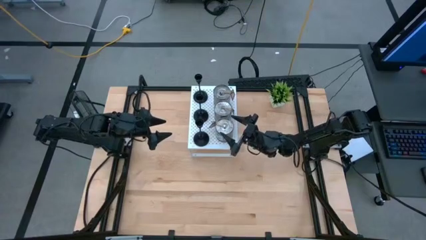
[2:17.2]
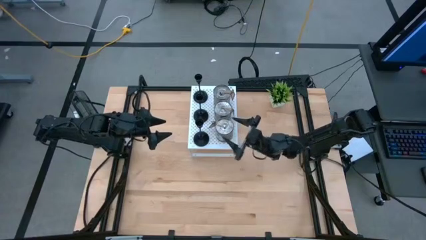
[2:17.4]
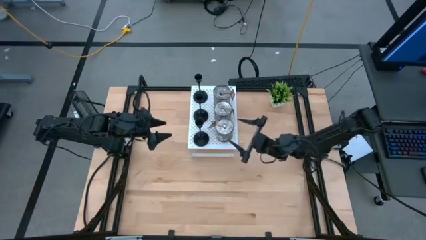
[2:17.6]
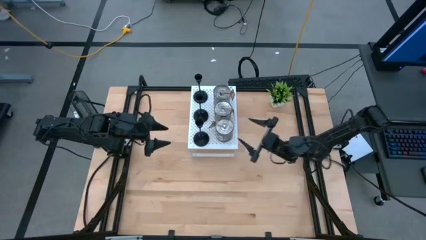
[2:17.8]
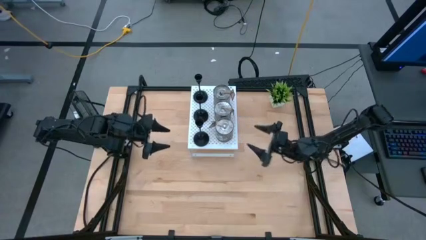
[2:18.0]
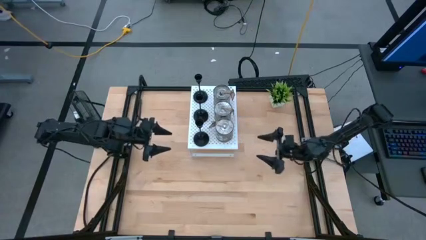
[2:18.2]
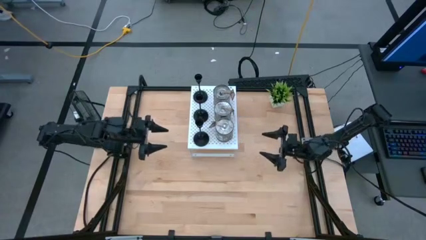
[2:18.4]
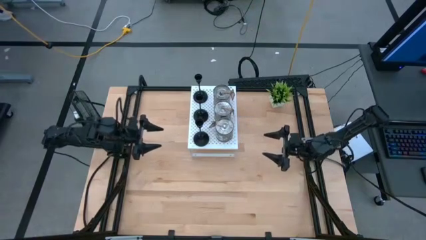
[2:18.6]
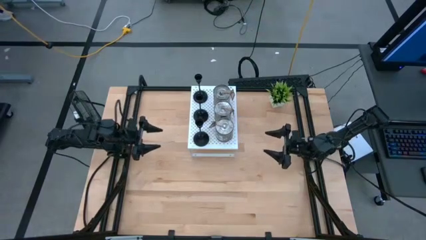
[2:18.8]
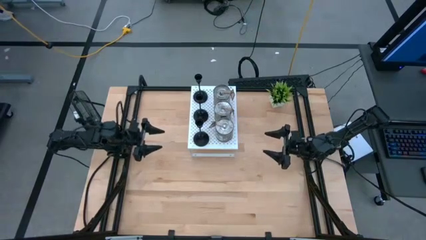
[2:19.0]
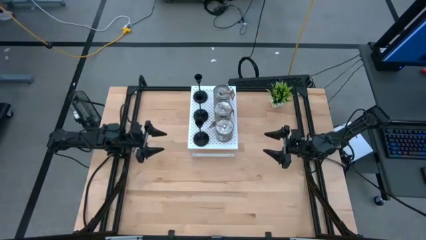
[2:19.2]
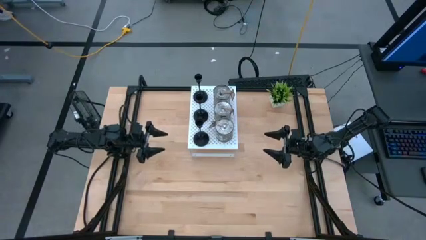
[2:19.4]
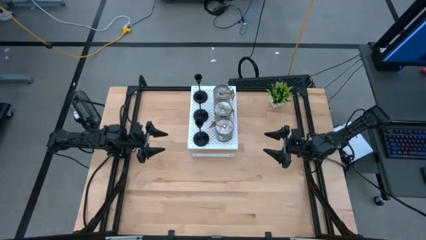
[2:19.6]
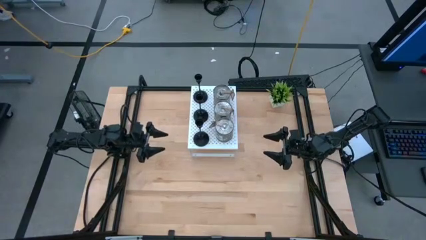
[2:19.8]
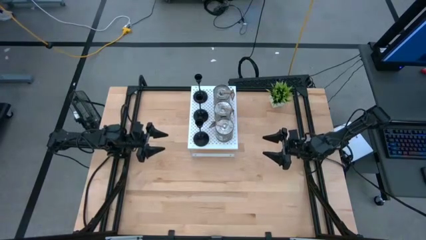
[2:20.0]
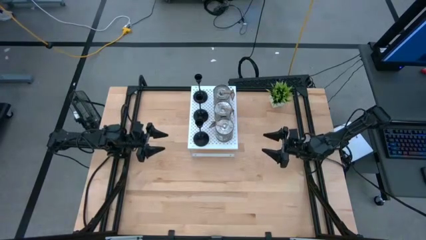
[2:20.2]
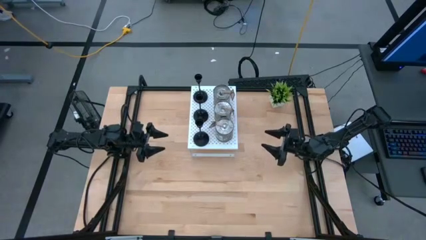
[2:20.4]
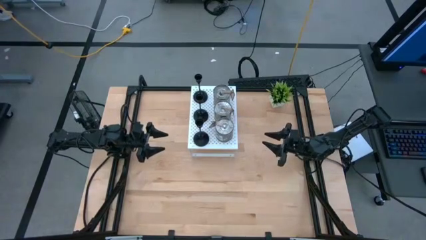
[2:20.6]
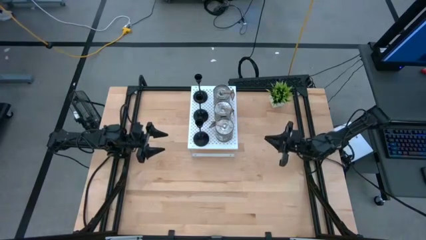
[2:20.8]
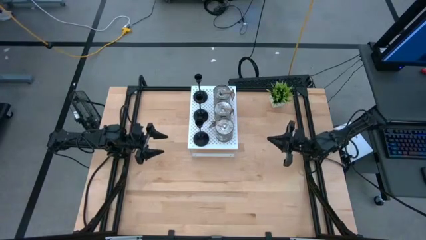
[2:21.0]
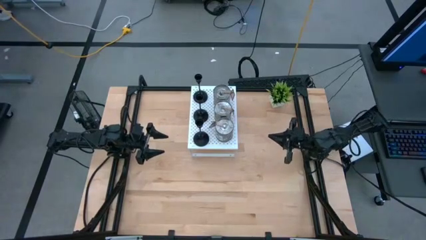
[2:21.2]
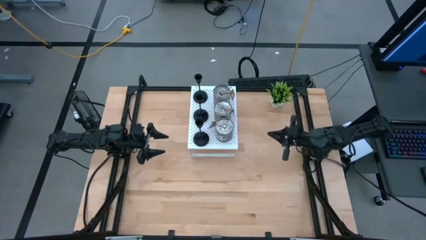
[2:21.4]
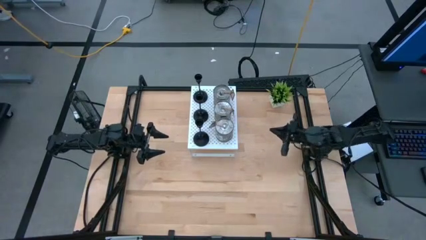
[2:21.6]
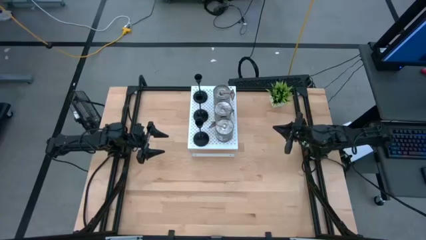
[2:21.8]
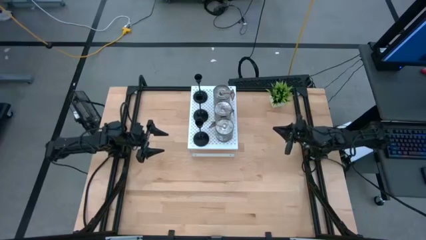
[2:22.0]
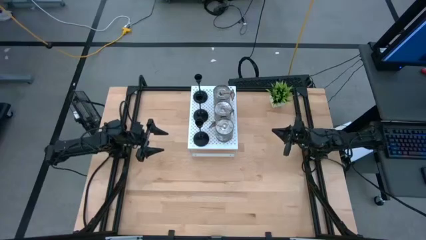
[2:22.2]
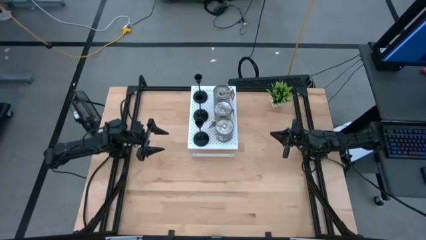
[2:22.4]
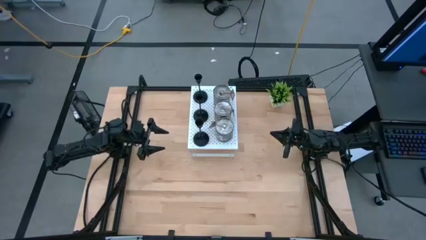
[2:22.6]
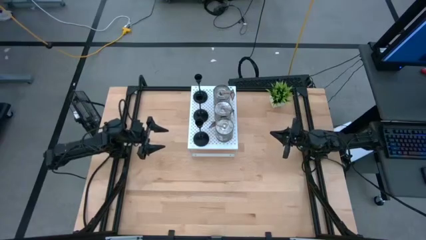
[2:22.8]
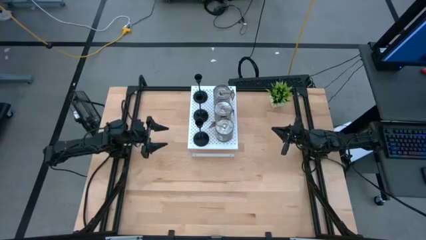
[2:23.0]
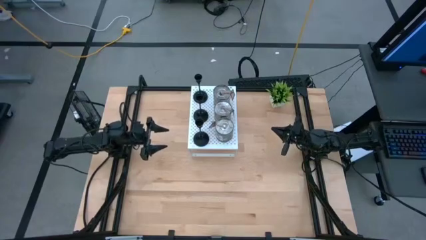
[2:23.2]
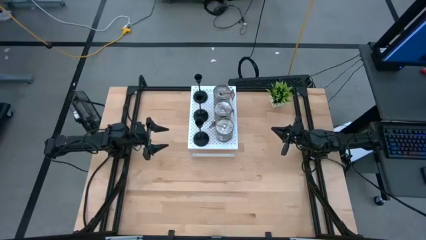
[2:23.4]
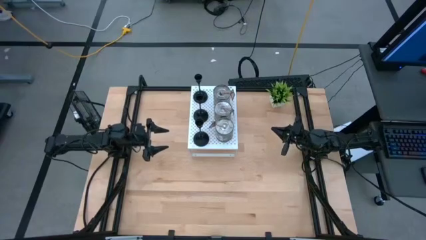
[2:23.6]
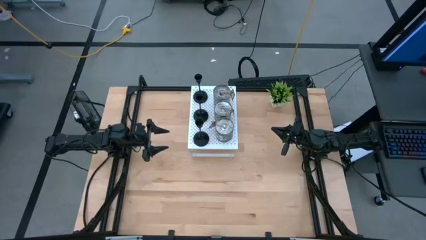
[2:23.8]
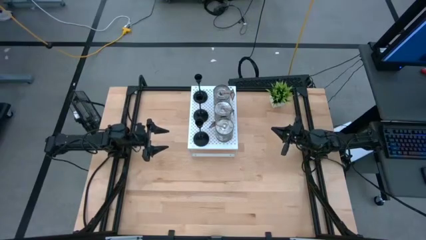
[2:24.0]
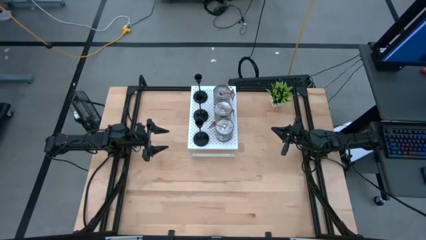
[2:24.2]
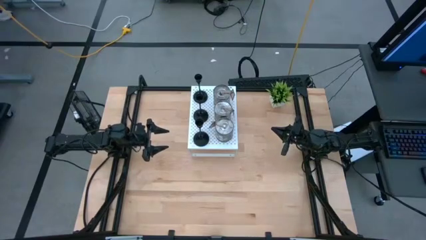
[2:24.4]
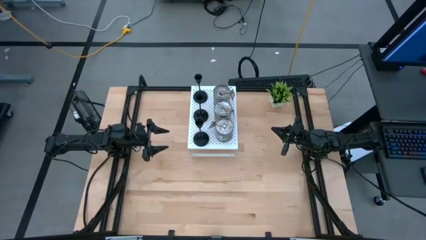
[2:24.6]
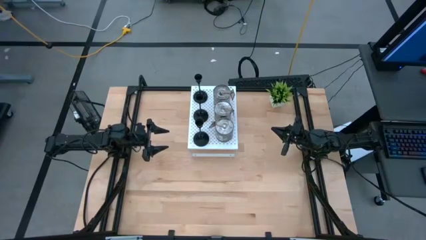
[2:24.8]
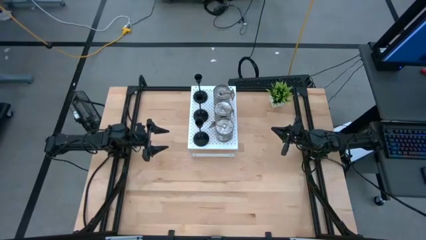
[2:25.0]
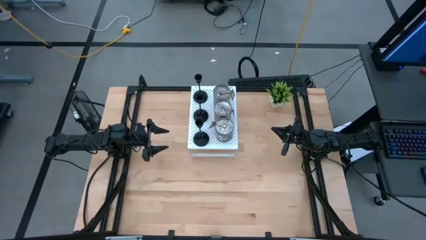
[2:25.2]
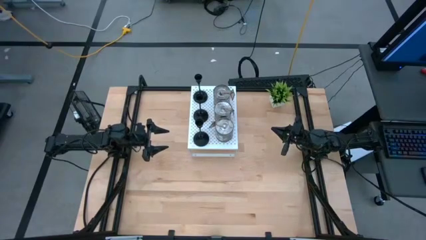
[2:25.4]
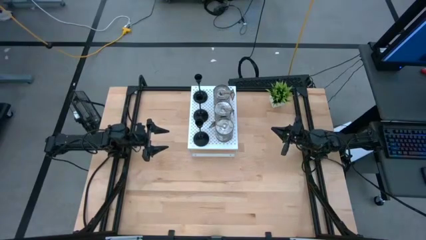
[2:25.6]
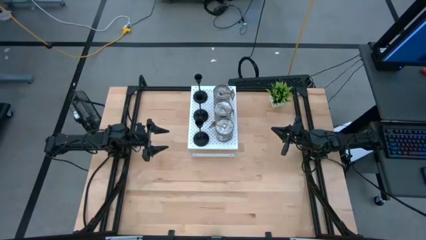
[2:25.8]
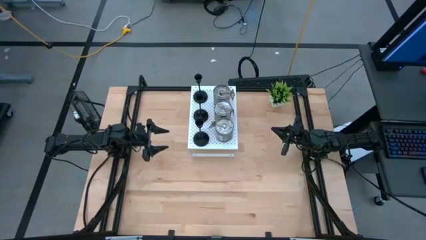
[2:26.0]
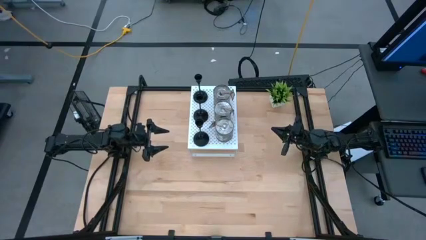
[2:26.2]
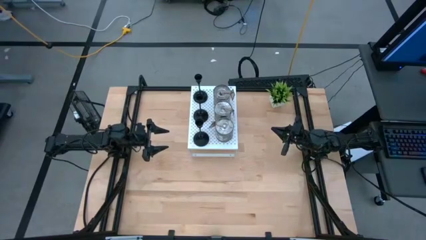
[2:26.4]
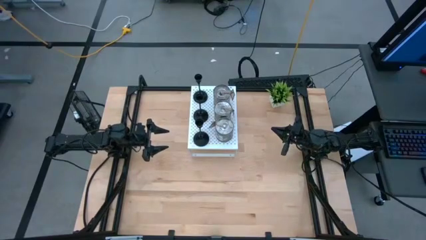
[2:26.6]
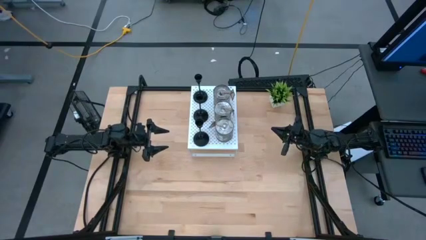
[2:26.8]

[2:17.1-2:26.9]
Task: Pick & Place candle stick holders
Return to Home Position

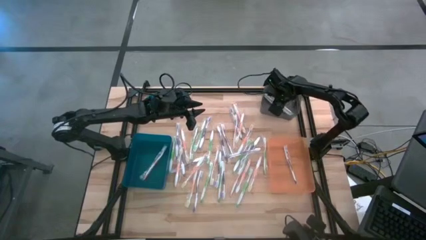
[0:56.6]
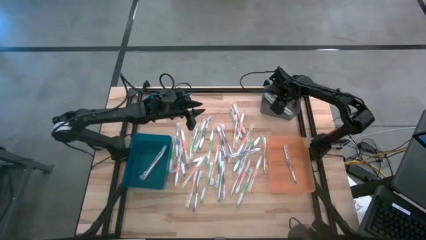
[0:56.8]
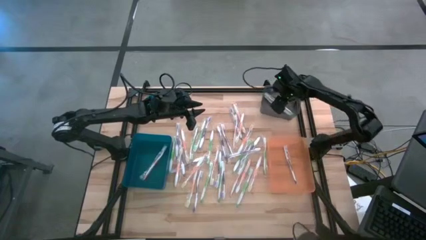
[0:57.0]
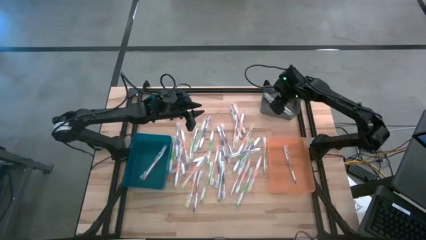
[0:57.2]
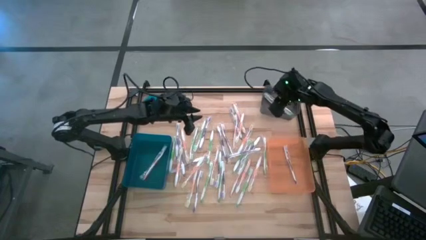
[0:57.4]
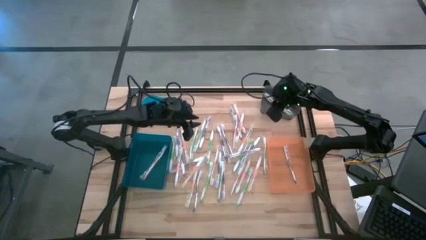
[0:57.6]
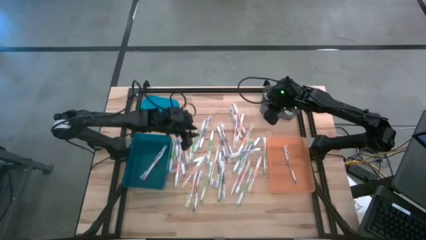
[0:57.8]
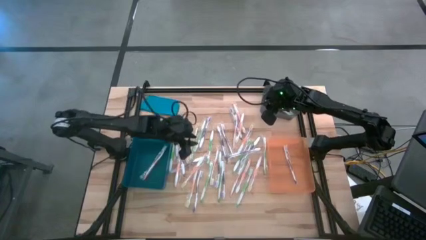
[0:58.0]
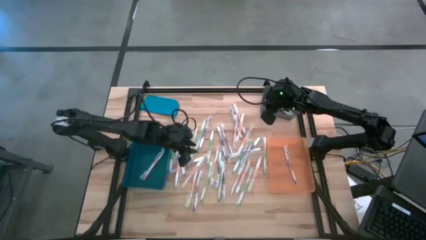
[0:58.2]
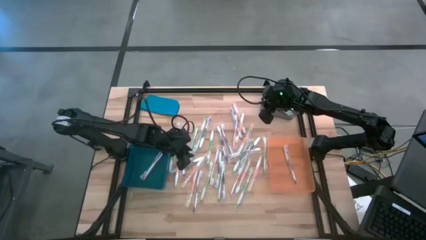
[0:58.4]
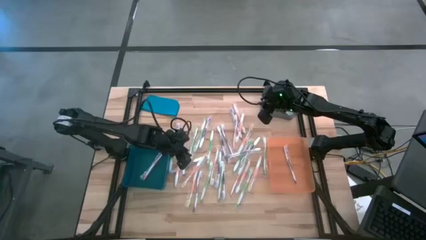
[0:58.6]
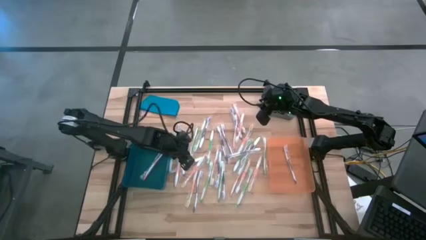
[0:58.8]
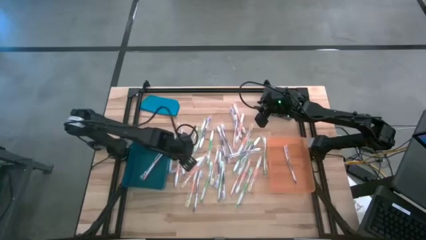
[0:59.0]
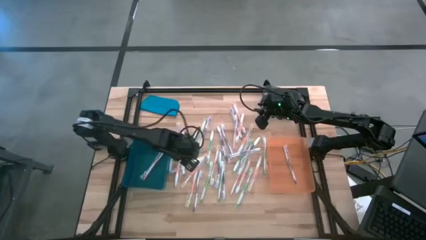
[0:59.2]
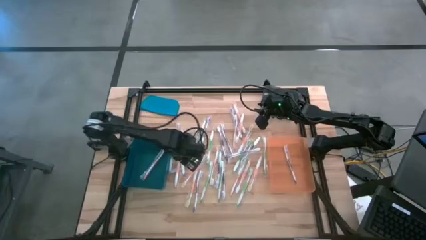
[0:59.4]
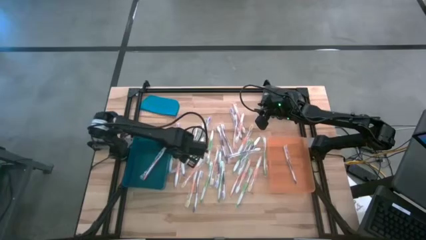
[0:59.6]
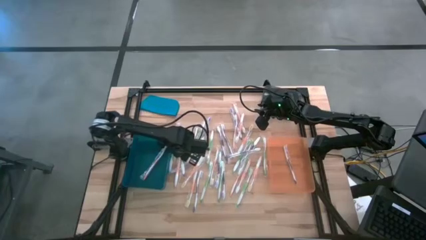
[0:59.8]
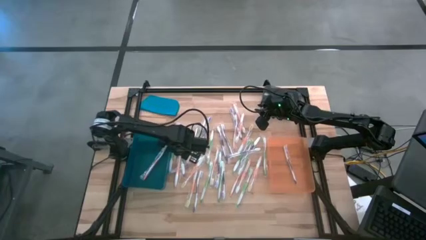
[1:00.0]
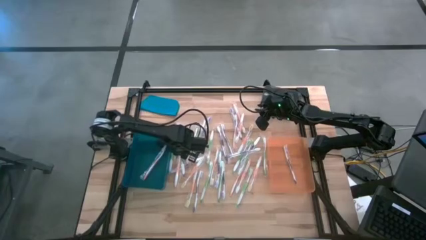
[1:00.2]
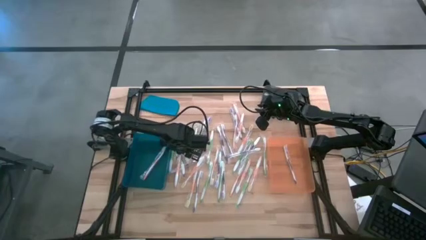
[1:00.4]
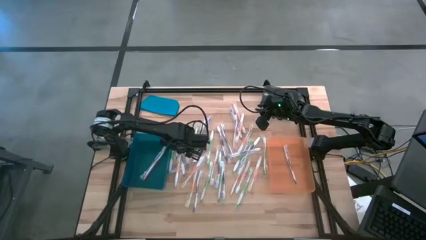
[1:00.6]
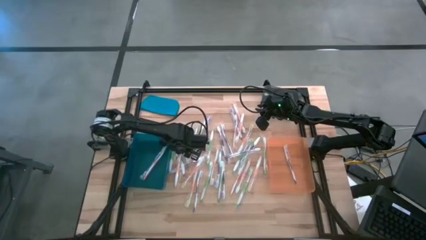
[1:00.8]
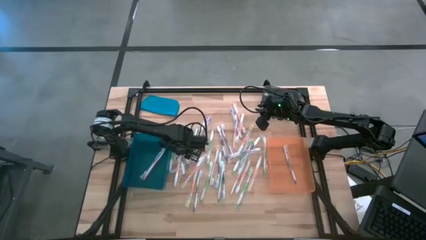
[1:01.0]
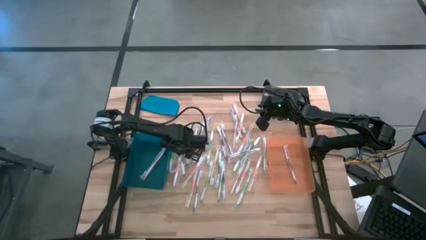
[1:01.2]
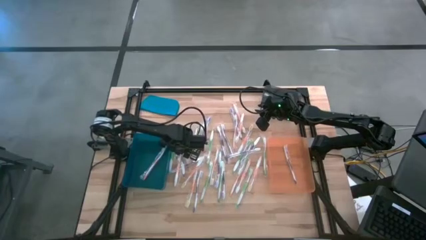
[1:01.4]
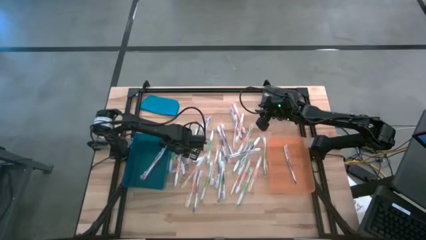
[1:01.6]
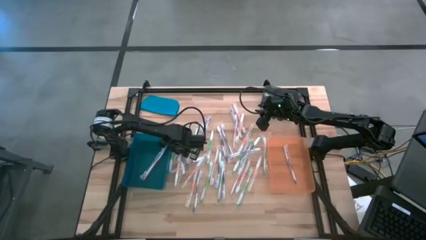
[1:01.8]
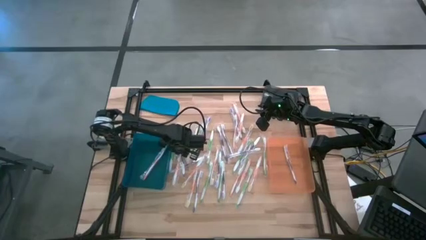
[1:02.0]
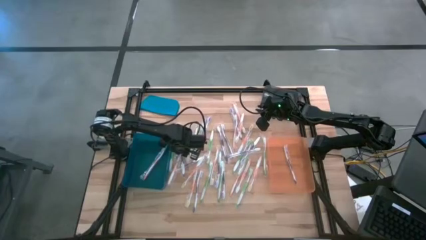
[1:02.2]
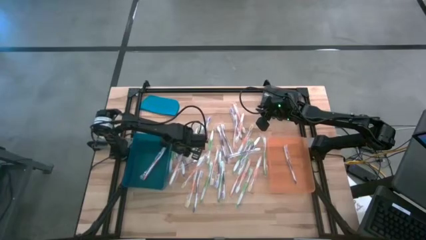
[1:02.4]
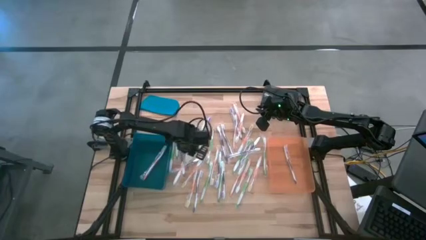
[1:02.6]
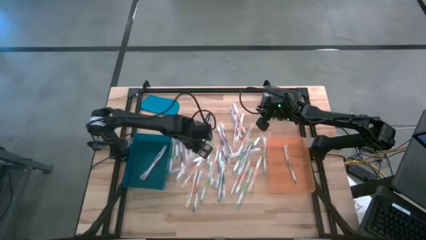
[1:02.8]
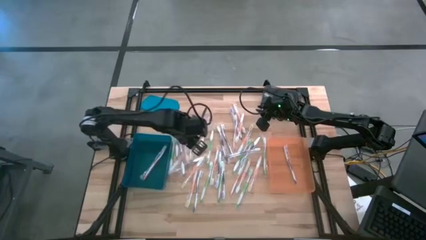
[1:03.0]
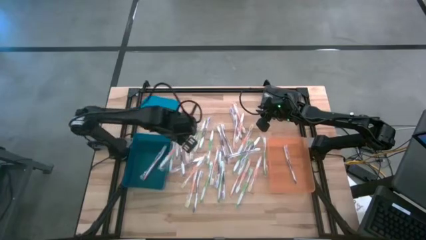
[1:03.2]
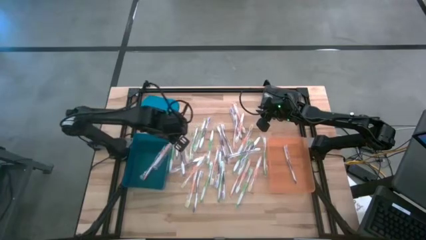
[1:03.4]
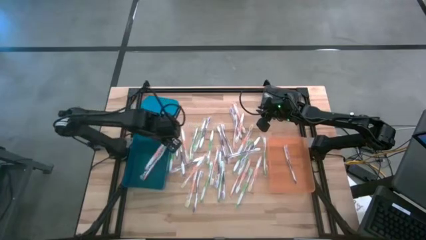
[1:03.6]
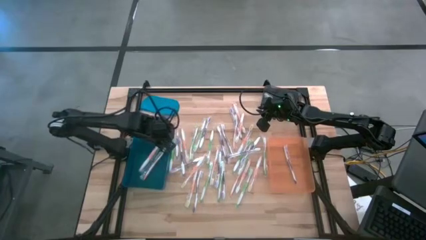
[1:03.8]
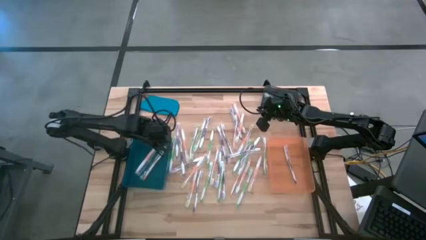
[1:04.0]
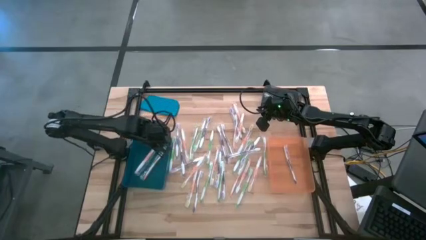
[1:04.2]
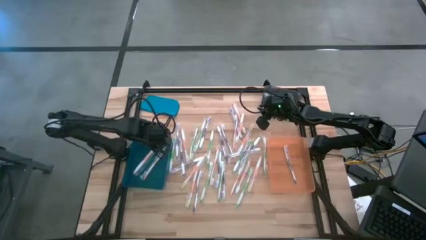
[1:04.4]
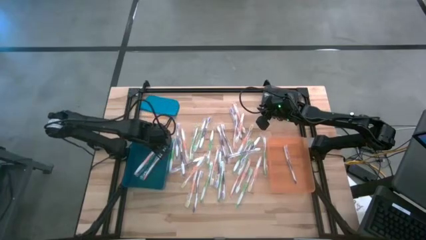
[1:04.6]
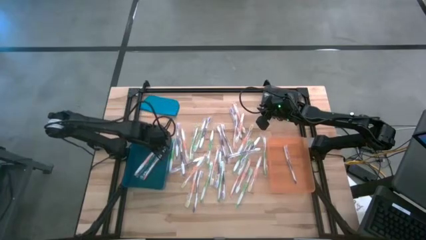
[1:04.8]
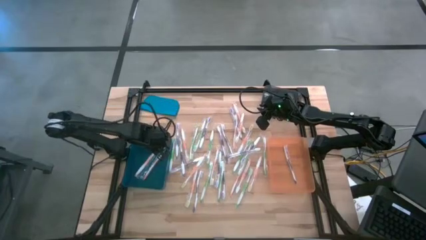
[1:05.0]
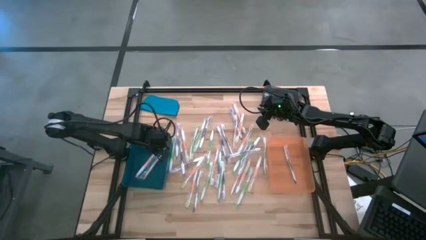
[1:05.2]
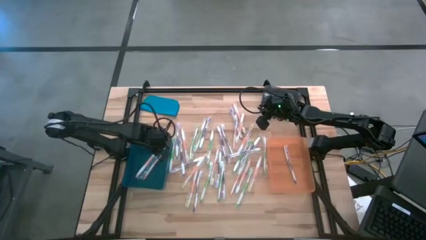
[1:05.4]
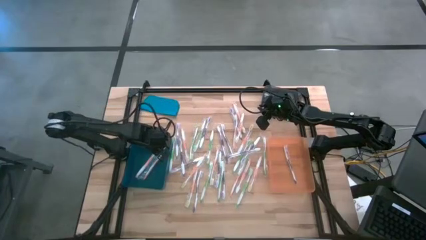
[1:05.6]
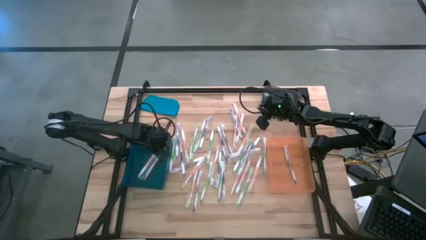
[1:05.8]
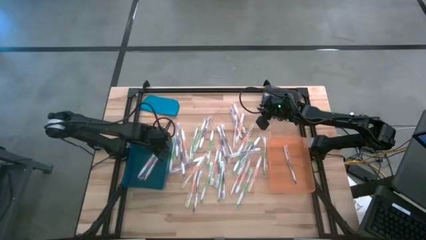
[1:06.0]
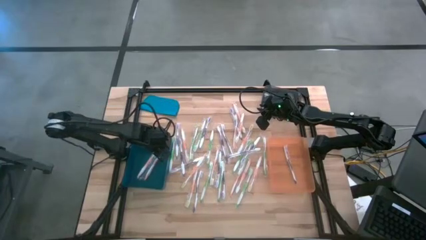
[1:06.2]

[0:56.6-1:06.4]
Task: Pick & Place Toothbrushes
Put the orange toothbrush into the blue bin
